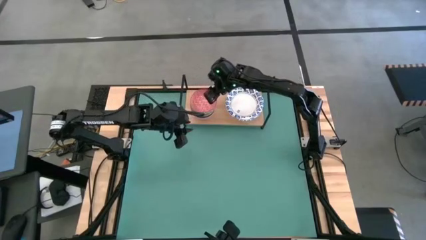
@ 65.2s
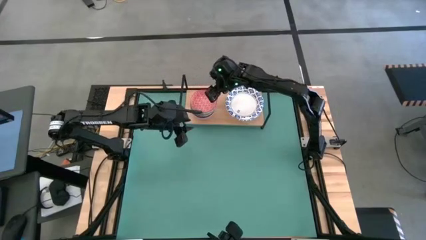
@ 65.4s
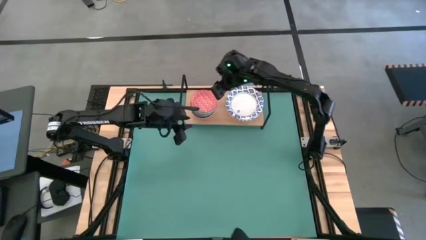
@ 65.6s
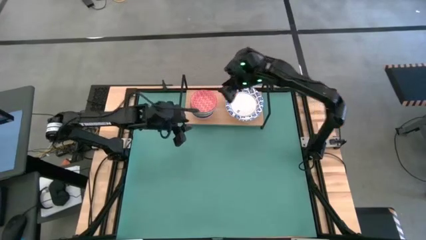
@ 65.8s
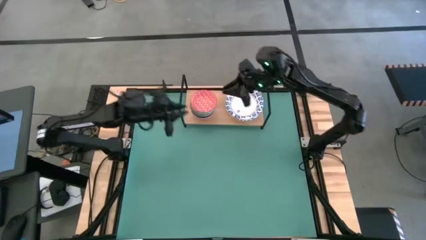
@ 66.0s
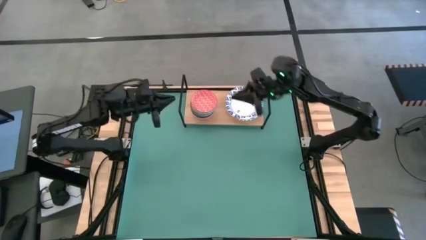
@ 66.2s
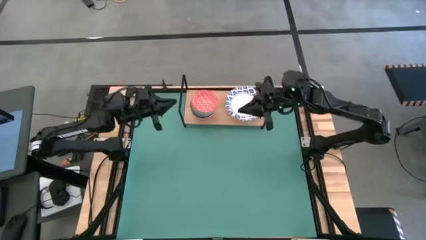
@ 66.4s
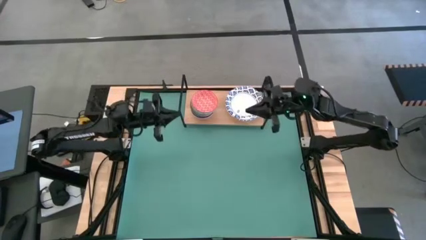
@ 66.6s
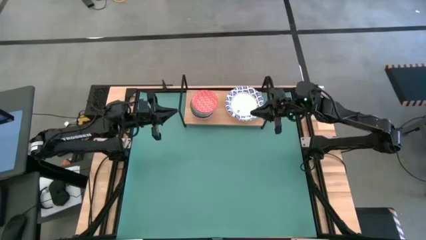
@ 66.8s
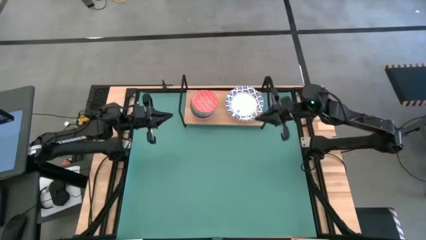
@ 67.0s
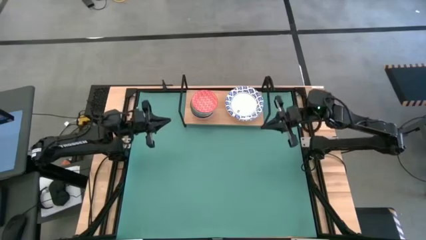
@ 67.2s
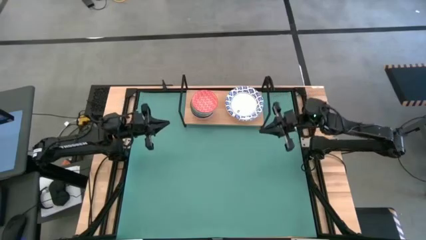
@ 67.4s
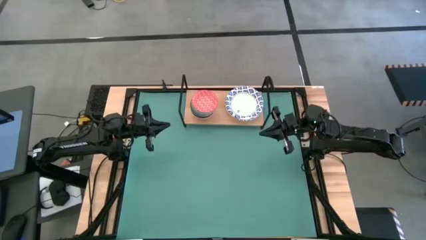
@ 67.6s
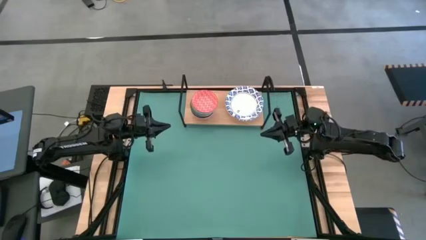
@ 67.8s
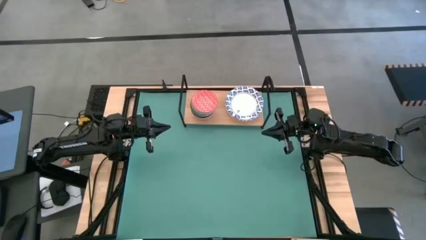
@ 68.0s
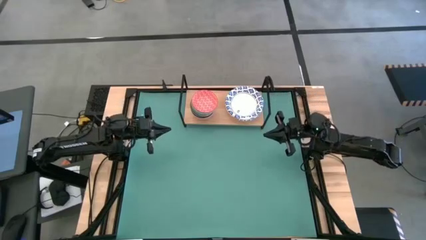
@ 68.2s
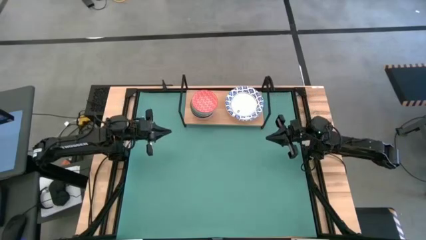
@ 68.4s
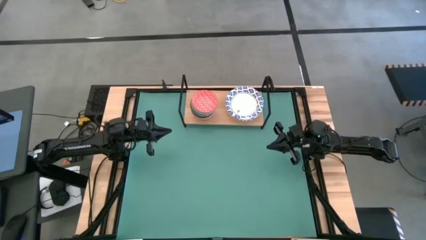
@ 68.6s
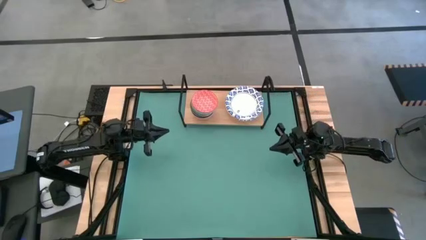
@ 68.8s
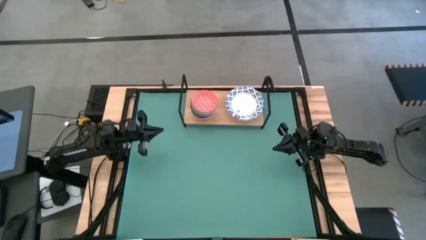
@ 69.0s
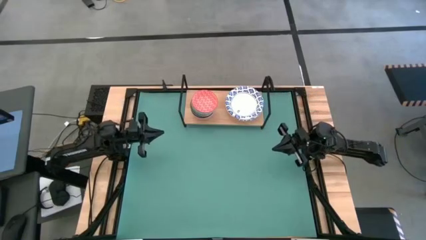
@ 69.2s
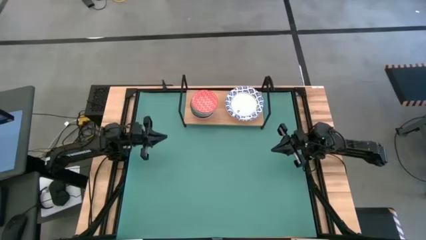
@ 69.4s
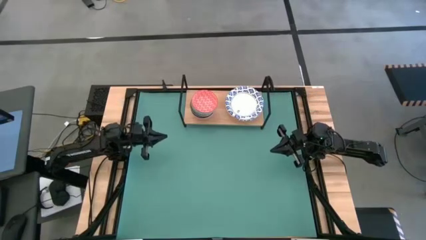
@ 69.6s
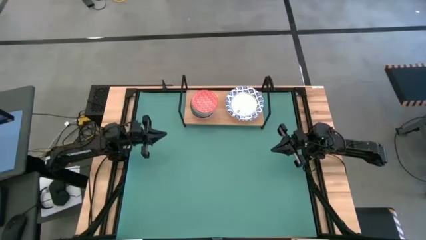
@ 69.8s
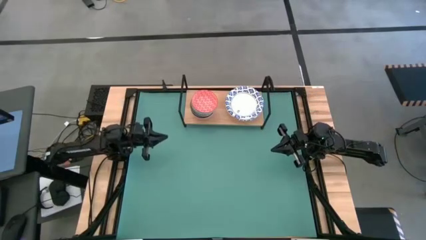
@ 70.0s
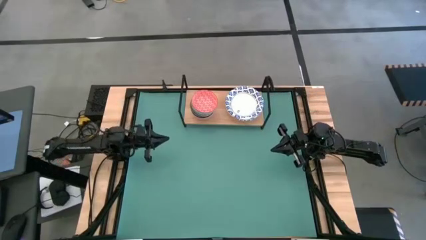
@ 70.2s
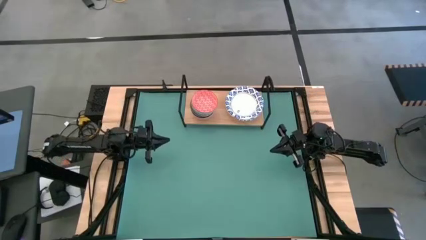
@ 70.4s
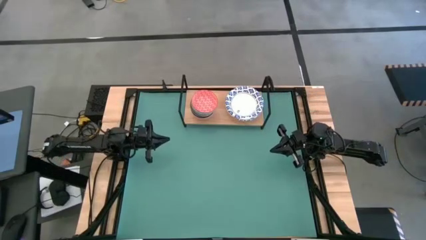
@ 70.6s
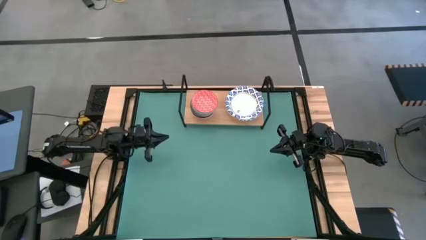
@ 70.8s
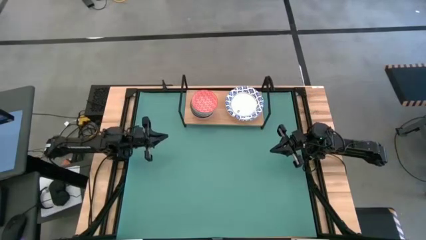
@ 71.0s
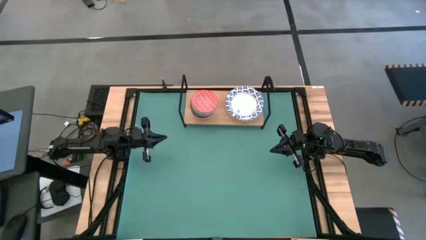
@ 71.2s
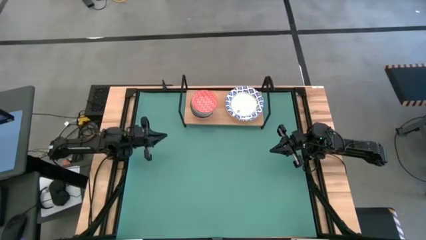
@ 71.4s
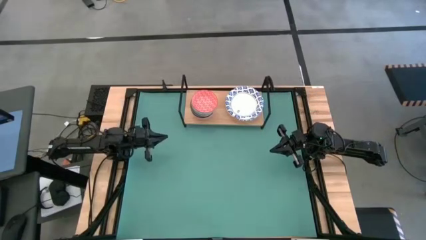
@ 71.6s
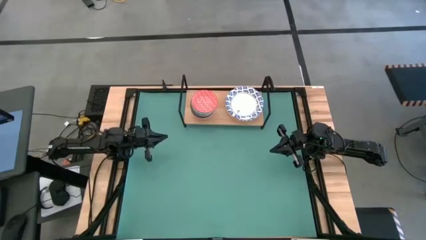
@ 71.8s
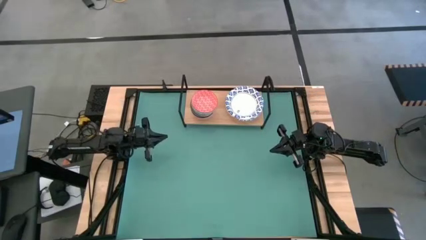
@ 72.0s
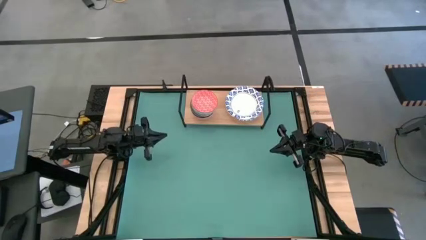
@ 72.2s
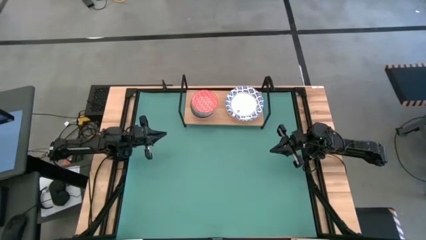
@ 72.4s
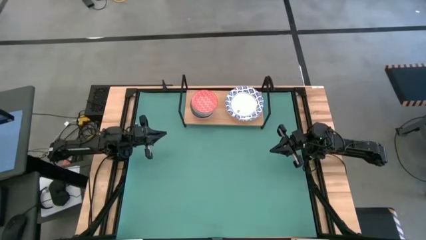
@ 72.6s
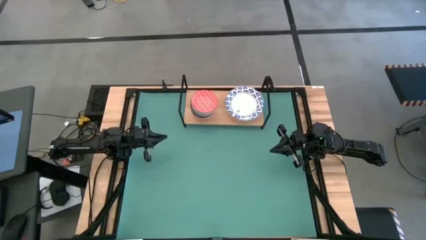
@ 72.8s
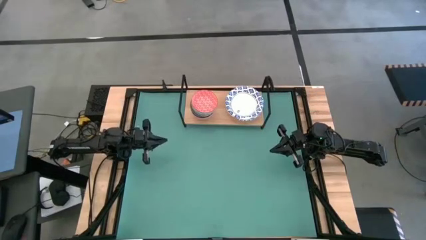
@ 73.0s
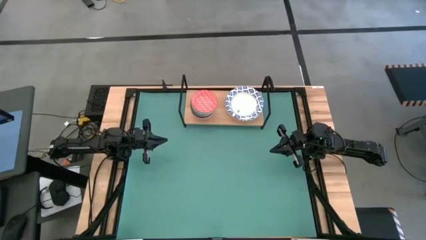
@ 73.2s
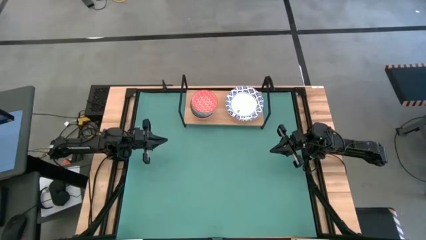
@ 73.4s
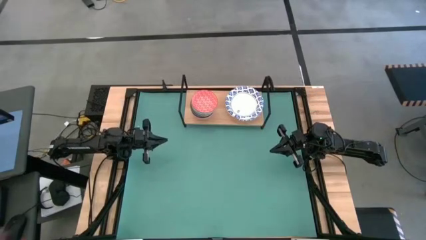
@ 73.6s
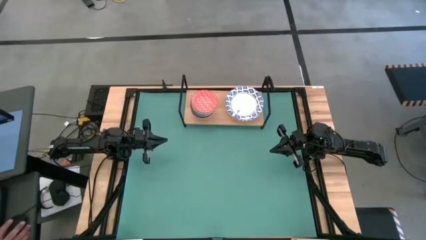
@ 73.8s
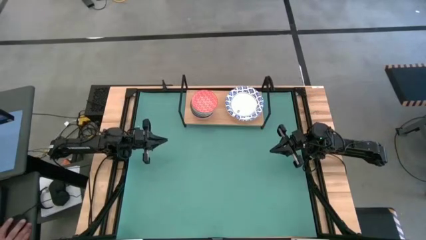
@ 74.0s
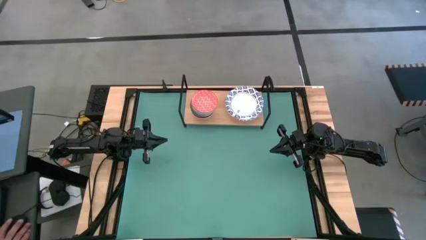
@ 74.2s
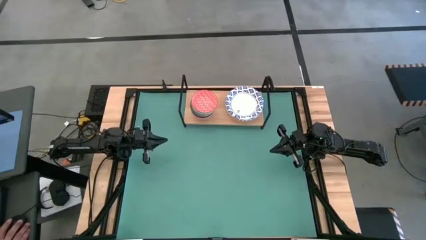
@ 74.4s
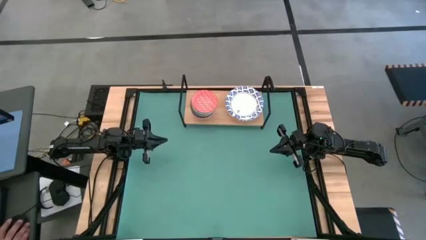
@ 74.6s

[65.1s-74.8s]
Task: Place and stack bowls onto a shelf
Return To Home Position

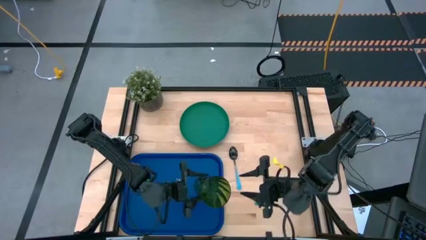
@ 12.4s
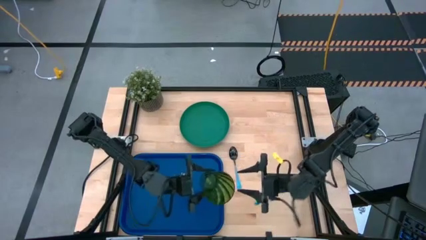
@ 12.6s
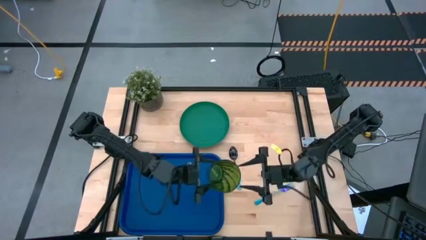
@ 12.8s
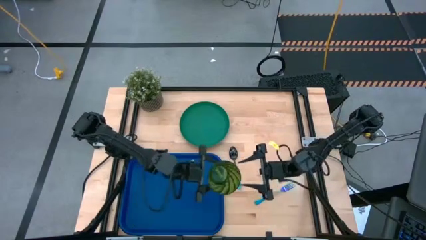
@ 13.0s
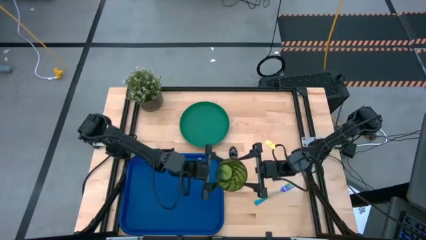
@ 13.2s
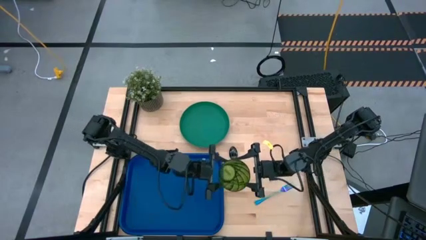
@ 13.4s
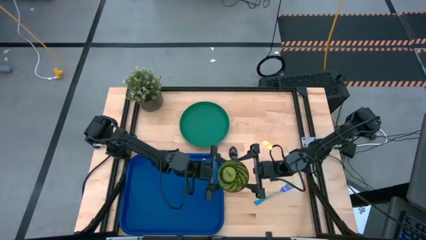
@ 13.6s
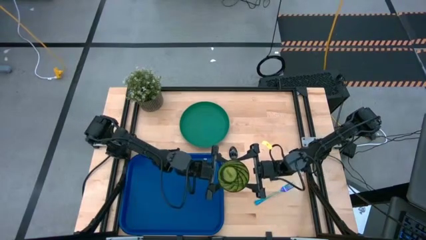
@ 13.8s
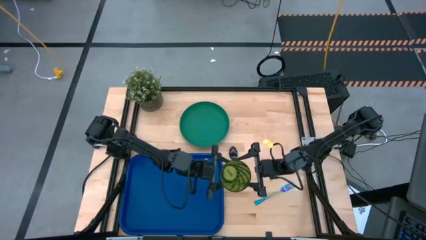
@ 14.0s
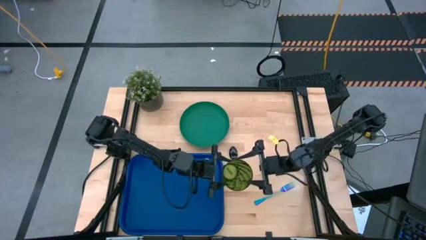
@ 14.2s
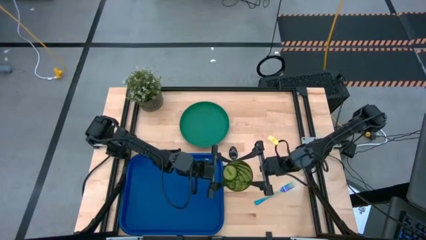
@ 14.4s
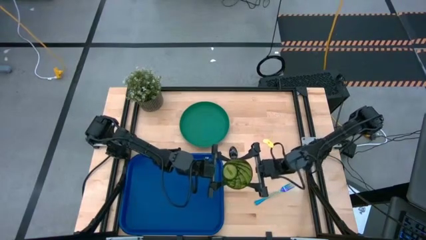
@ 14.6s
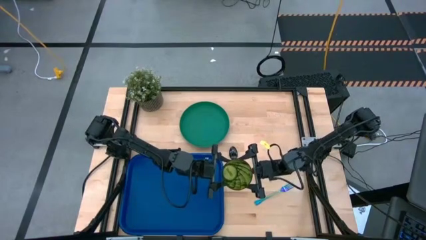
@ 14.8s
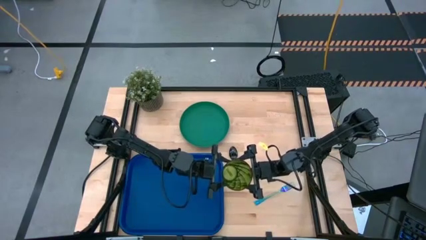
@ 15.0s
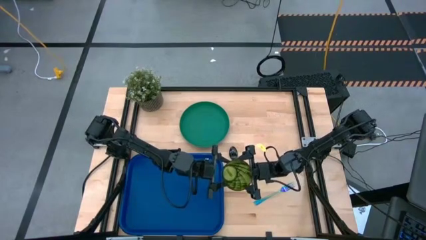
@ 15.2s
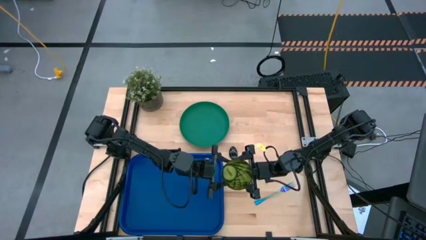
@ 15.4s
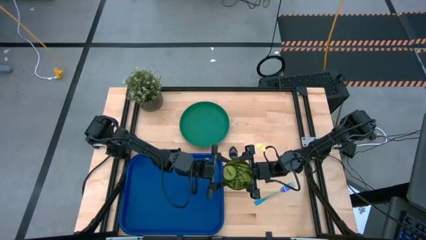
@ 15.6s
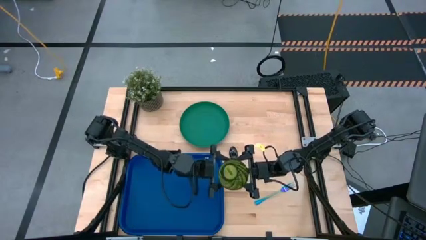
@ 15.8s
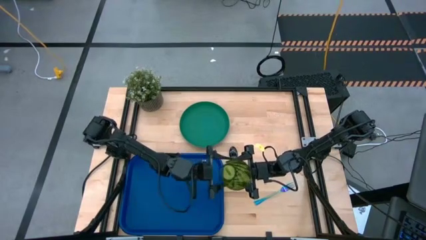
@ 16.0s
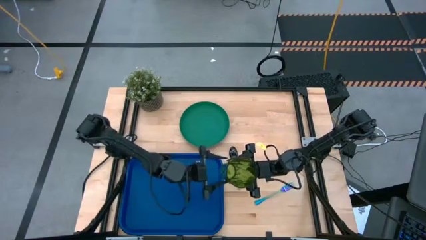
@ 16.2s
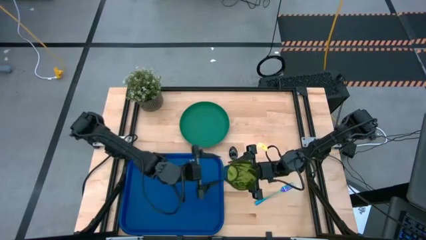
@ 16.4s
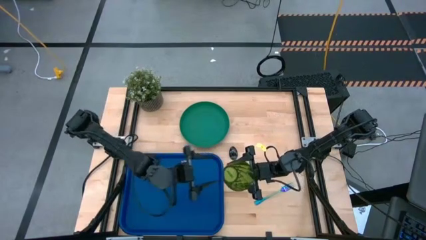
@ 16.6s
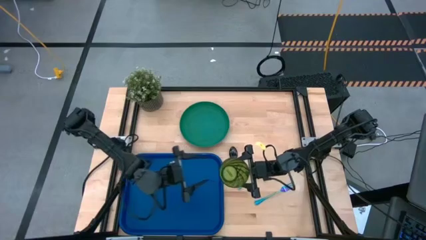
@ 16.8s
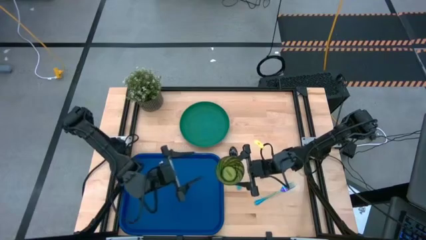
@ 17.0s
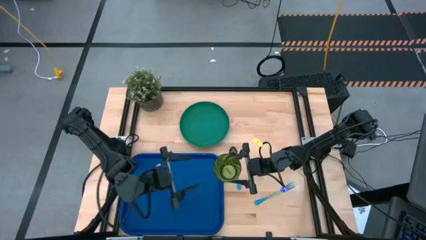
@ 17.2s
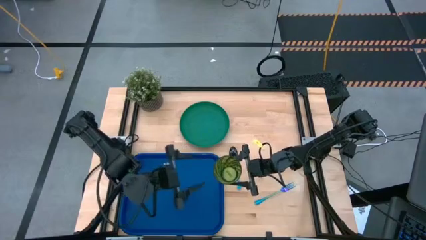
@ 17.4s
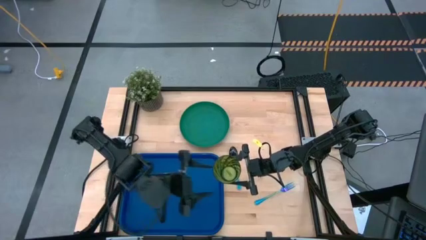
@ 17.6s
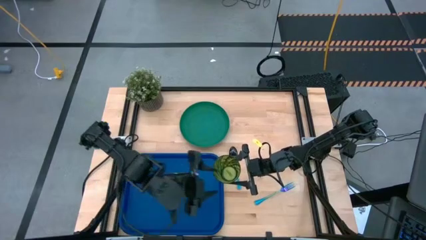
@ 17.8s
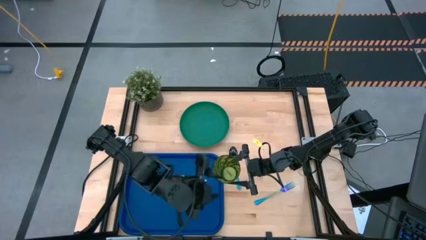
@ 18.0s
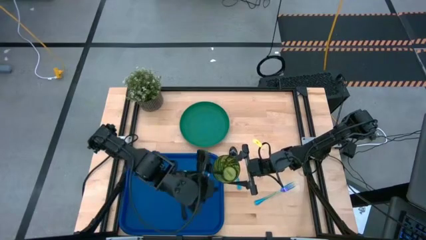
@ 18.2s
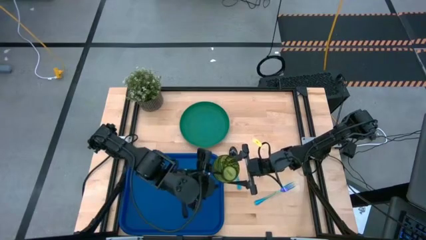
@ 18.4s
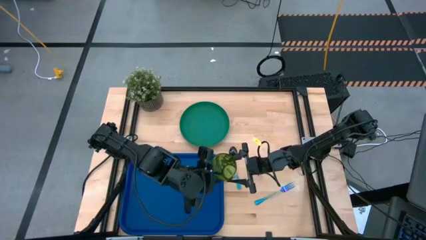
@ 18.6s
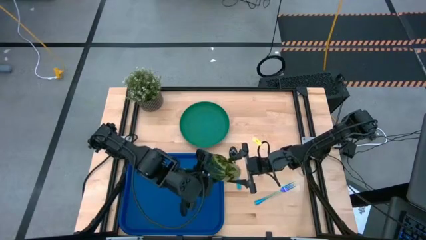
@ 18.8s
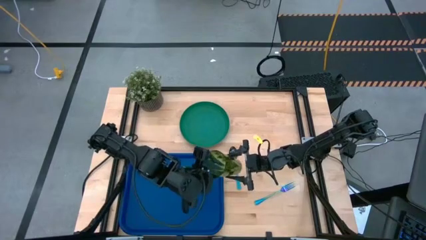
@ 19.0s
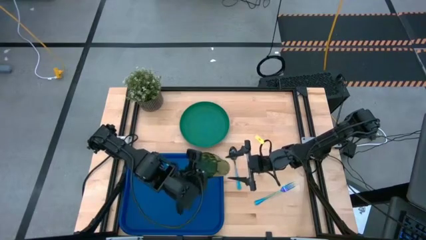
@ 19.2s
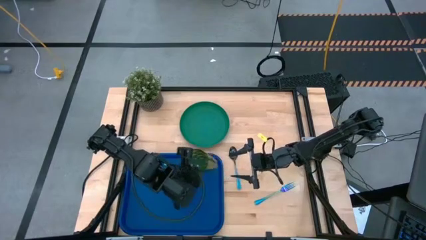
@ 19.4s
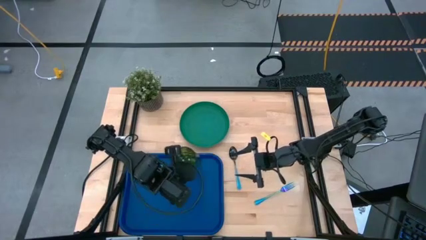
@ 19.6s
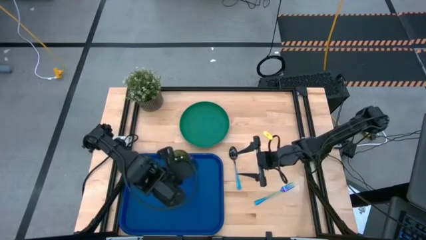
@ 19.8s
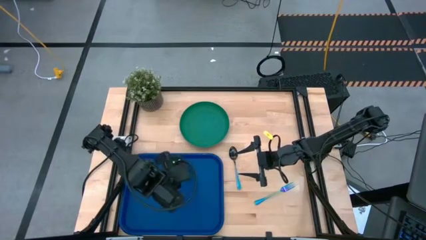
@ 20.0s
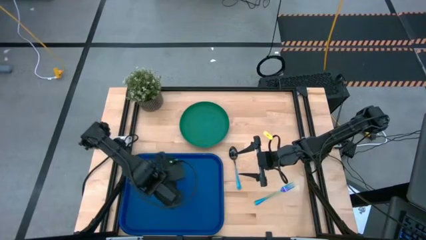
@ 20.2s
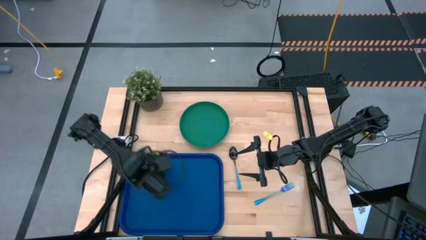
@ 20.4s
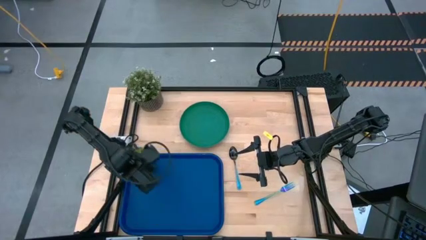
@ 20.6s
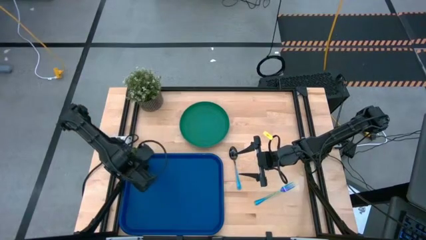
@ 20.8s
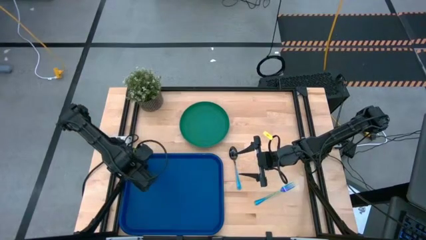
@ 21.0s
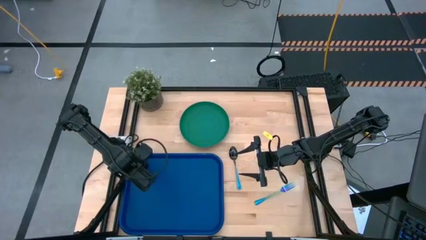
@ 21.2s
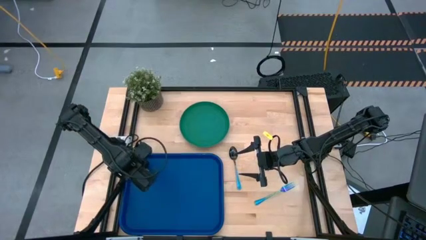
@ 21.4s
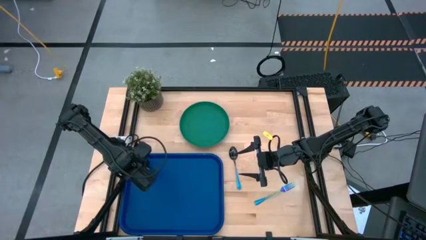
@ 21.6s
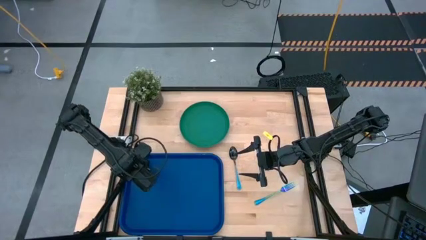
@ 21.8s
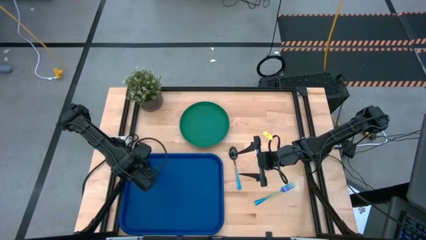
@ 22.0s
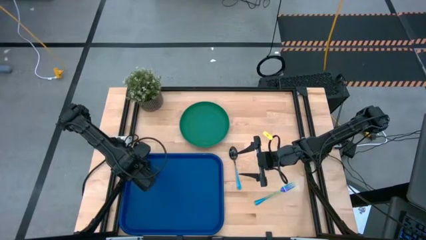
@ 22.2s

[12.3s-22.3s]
Task: Pick and place plate/cup/fork/spoon on tray
Put the green glass on the dark blue tray
